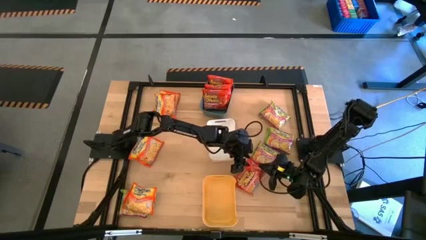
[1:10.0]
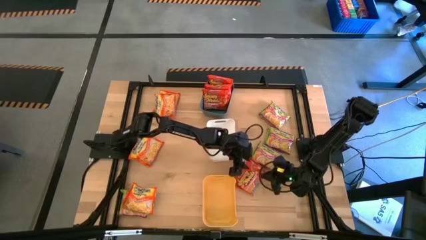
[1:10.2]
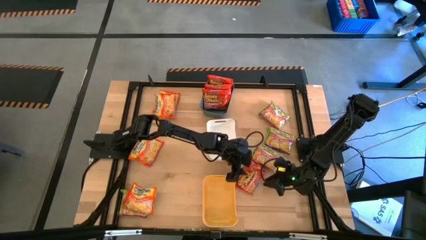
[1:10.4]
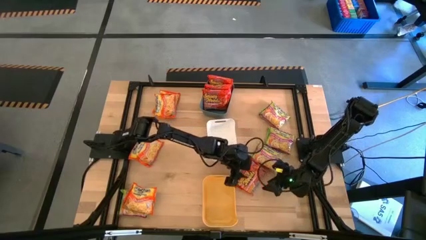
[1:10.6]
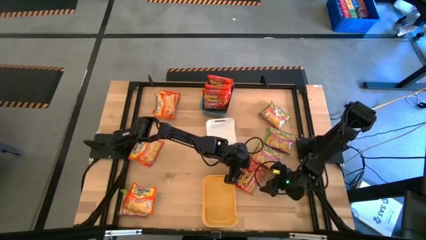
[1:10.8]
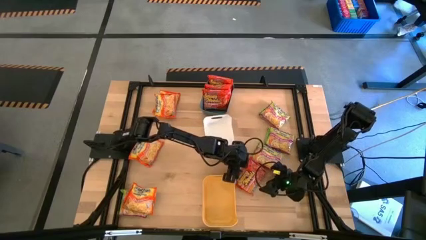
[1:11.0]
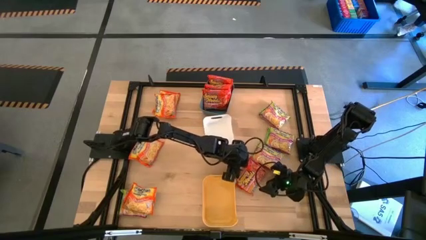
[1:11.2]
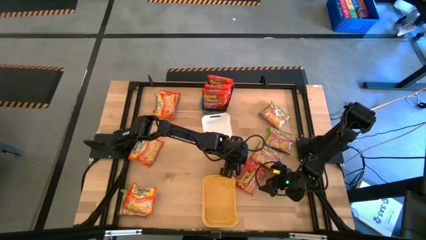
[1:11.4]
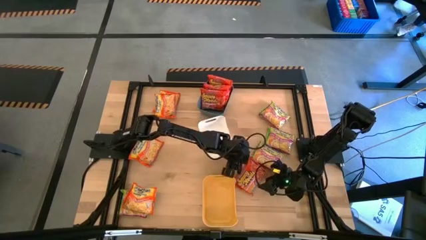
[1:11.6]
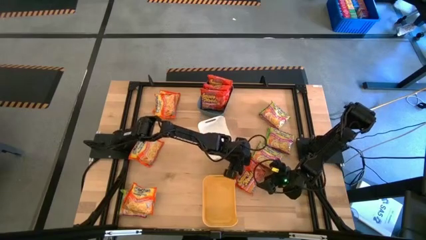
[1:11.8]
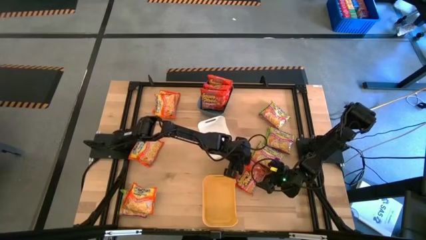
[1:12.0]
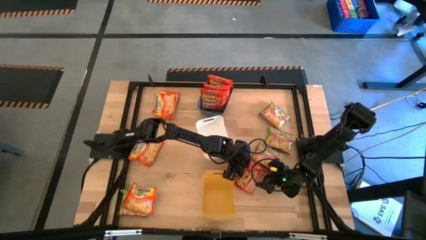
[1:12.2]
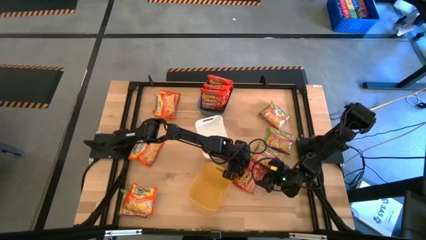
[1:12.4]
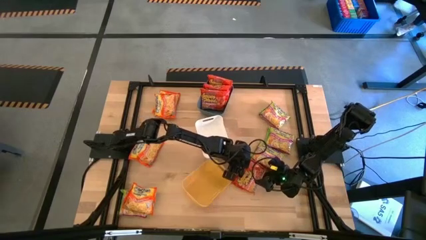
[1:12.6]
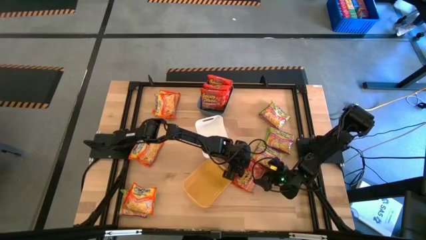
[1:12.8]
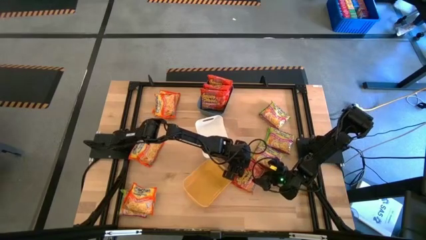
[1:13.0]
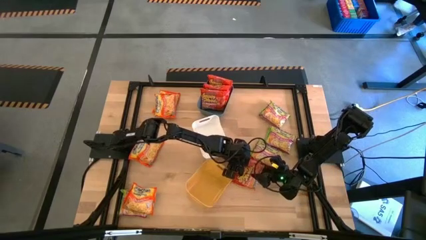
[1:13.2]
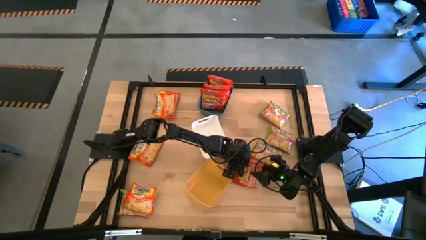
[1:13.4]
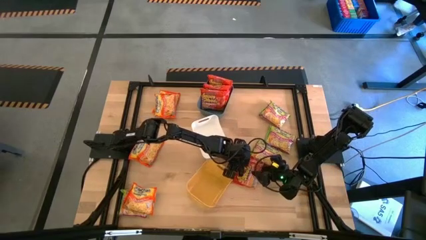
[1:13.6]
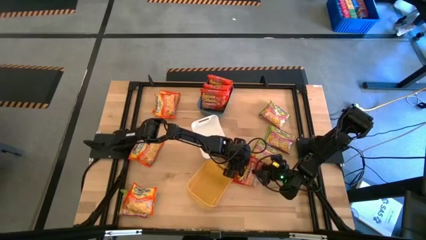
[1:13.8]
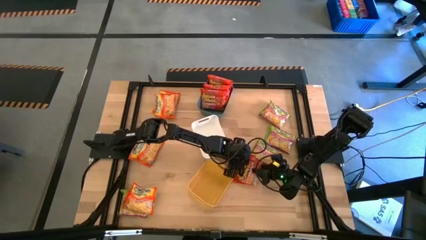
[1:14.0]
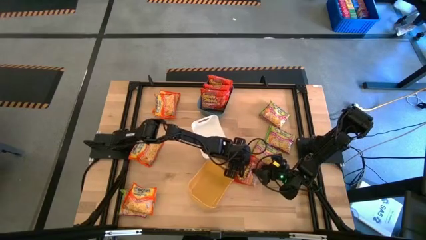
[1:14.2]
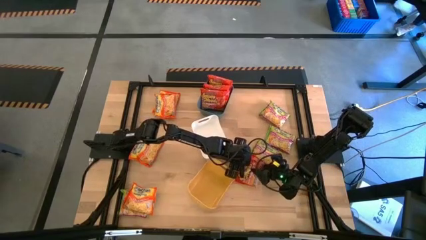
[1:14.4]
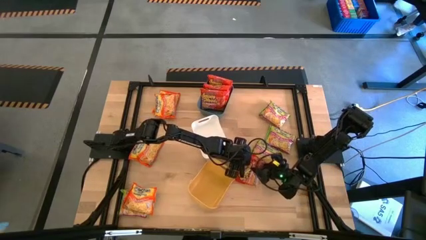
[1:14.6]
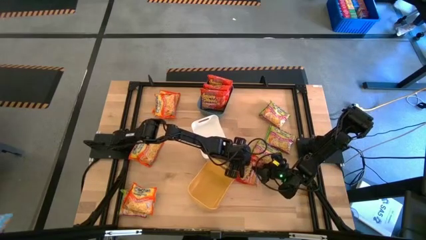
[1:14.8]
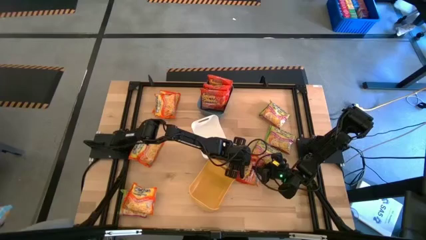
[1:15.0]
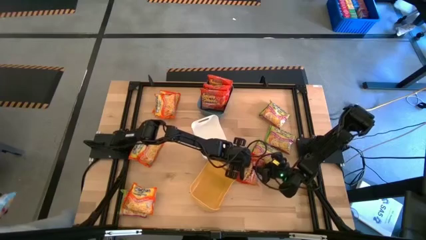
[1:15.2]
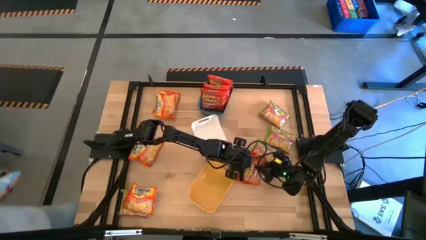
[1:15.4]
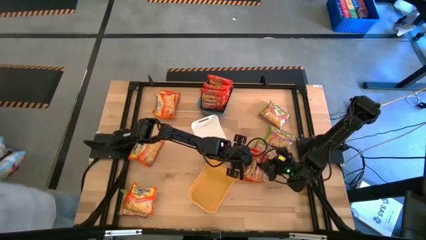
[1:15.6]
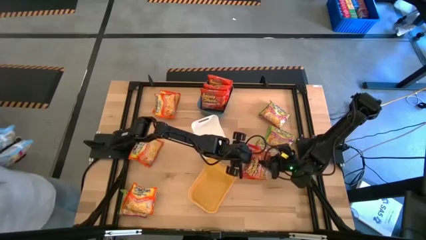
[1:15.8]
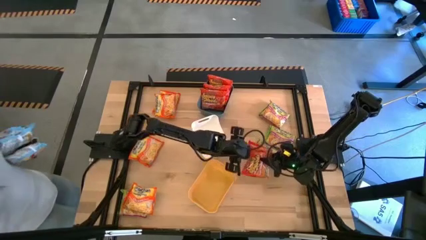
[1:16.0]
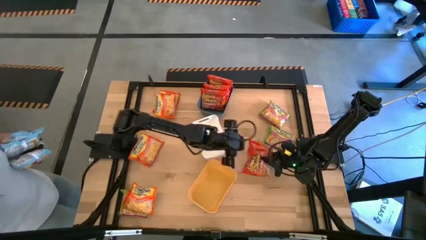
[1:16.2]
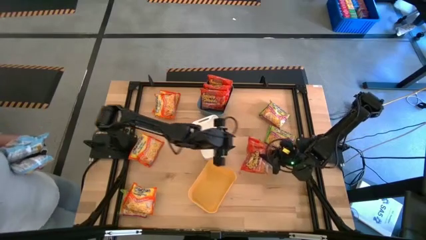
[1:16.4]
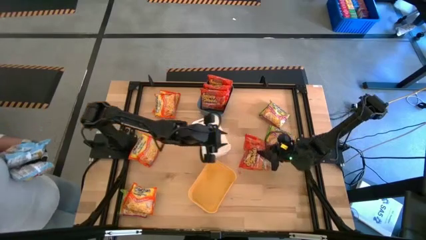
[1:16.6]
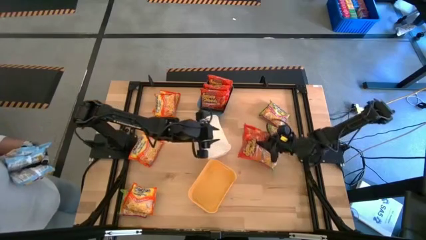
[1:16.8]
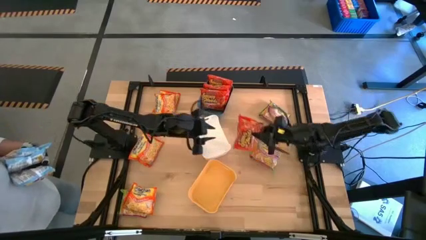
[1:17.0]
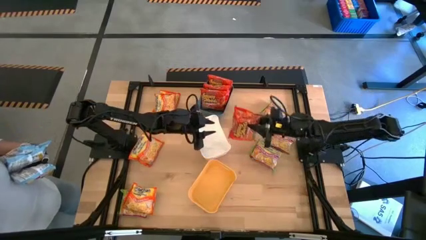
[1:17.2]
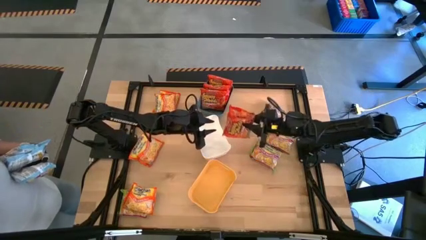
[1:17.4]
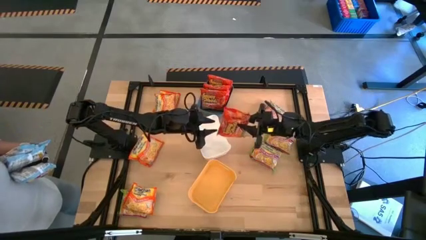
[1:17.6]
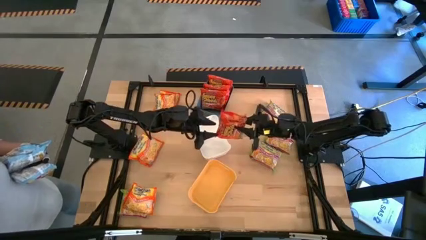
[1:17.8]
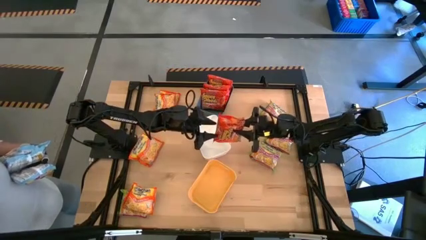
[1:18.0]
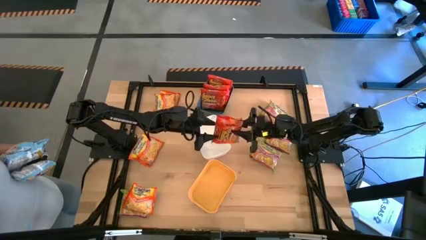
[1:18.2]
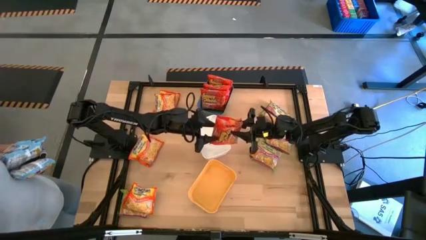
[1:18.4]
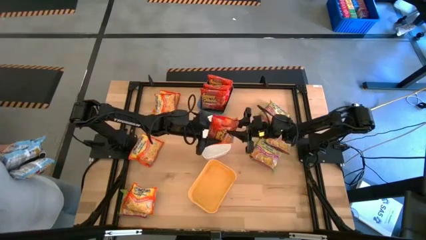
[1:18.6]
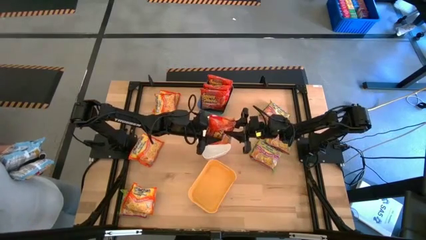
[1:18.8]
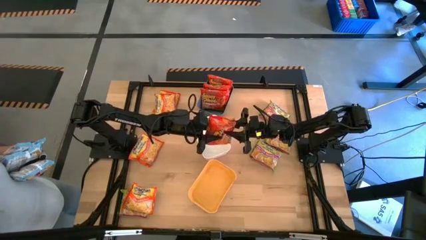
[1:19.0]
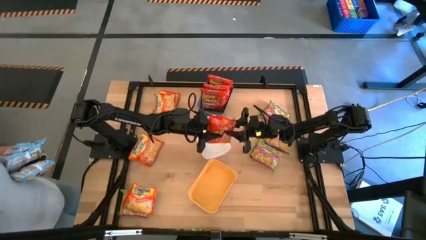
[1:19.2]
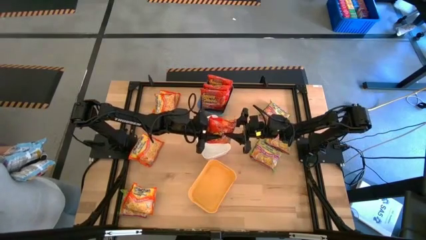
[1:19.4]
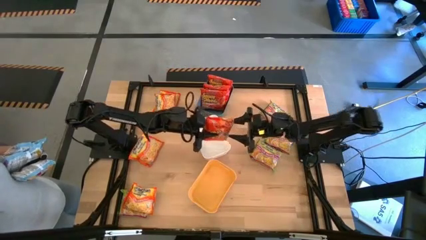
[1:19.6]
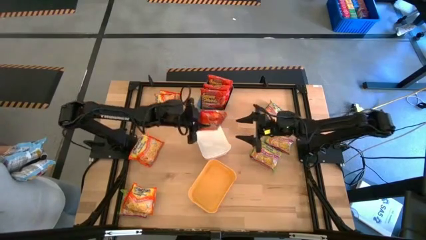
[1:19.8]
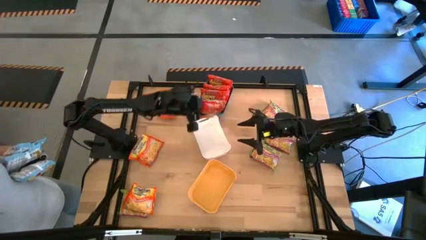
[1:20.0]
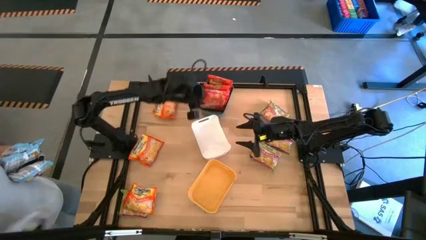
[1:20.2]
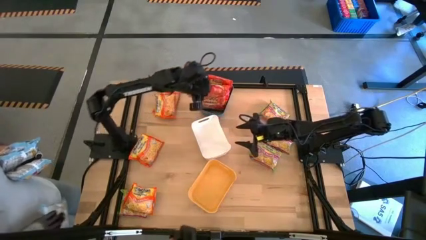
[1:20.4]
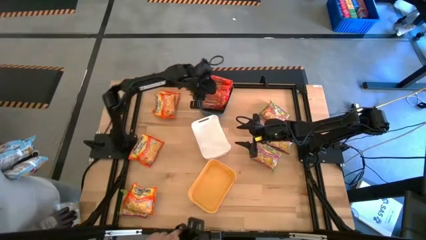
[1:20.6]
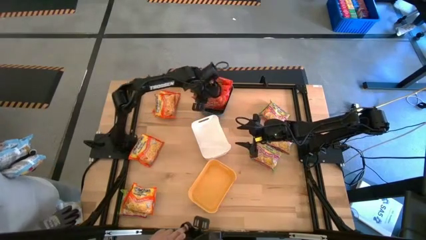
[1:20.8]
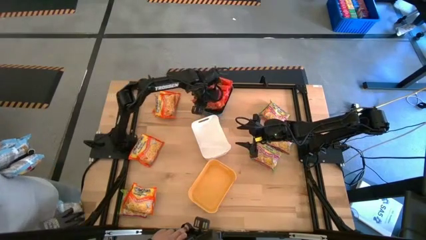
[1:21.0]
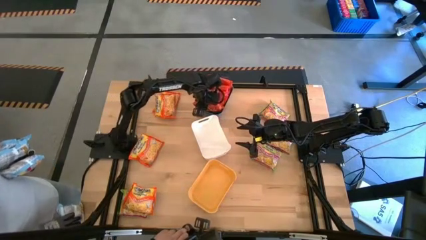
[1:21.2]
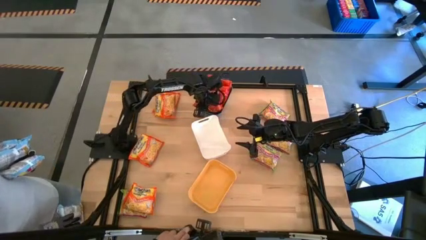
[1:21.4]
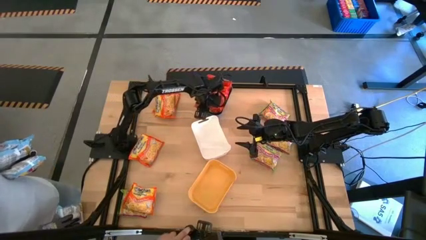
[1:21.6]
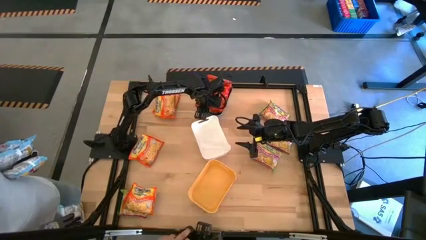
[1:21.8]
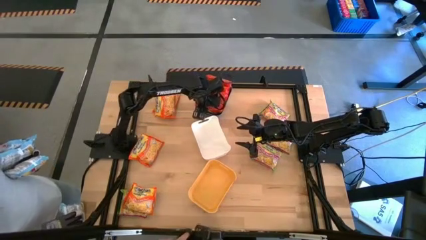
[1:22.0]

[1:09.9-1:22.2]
Task: Sort Maruchan noodles
Put the red noodle pack into the blue bin

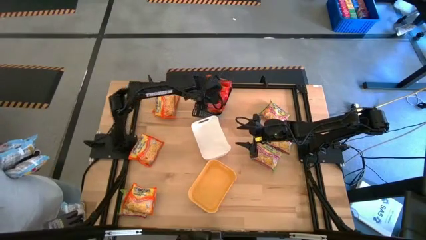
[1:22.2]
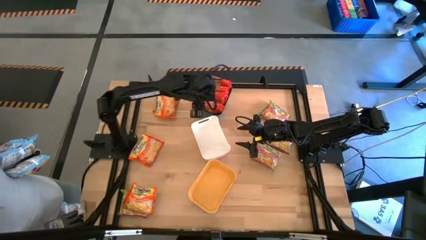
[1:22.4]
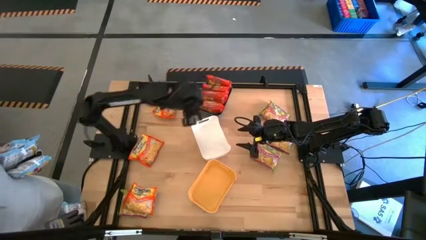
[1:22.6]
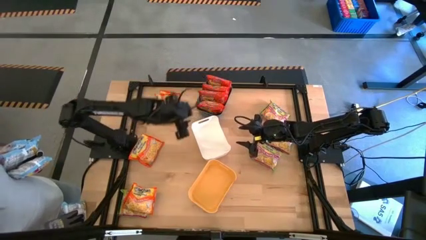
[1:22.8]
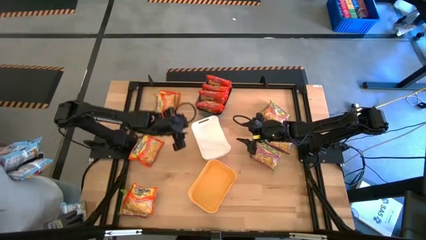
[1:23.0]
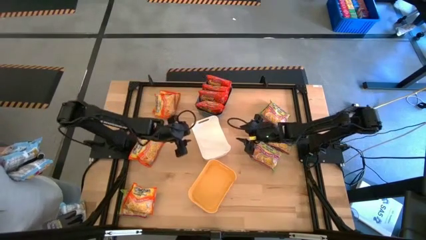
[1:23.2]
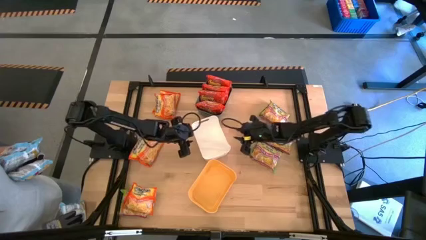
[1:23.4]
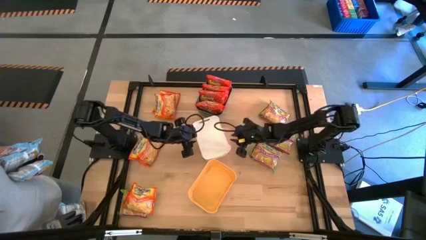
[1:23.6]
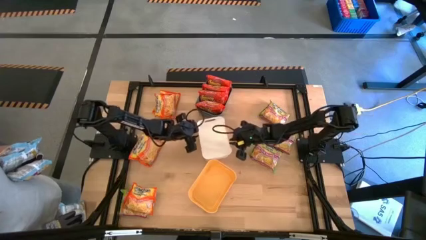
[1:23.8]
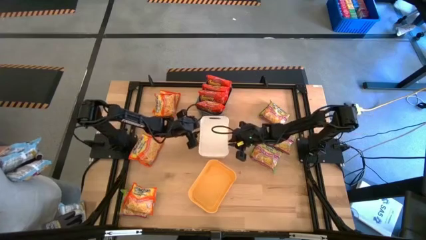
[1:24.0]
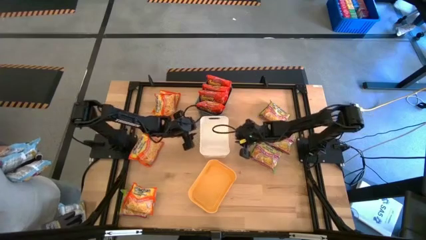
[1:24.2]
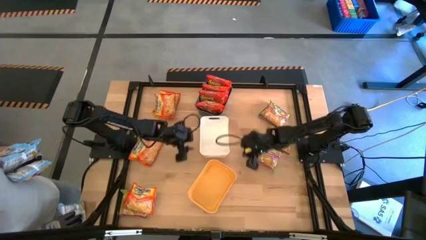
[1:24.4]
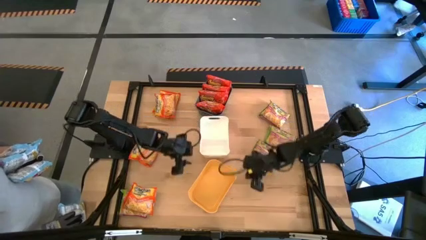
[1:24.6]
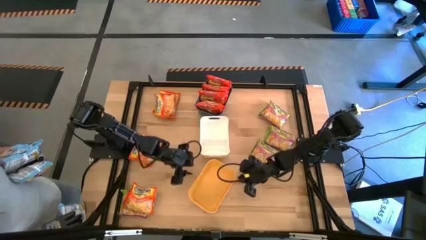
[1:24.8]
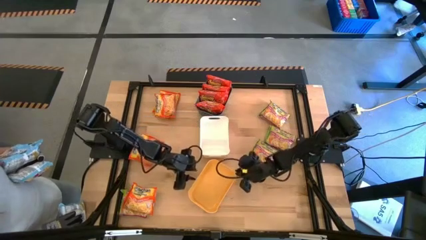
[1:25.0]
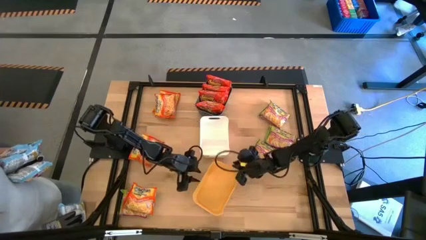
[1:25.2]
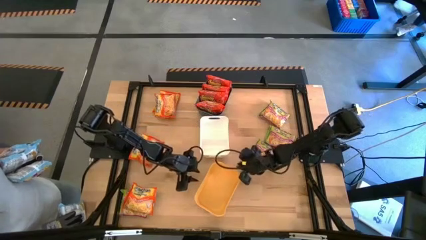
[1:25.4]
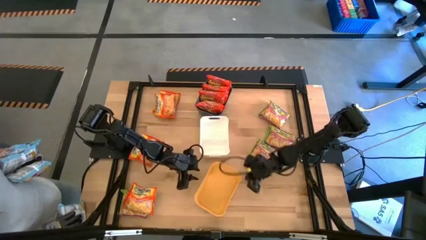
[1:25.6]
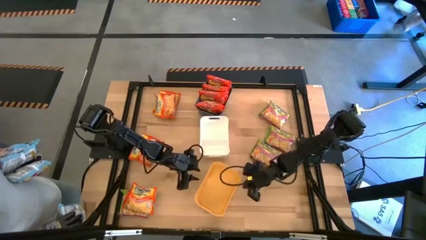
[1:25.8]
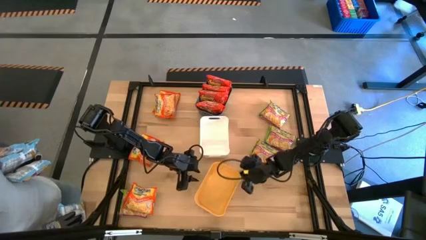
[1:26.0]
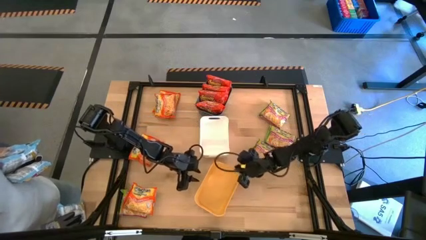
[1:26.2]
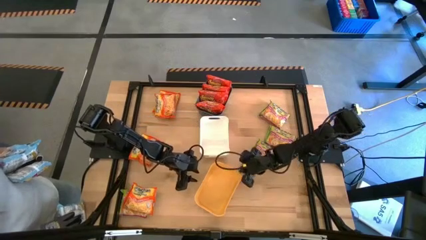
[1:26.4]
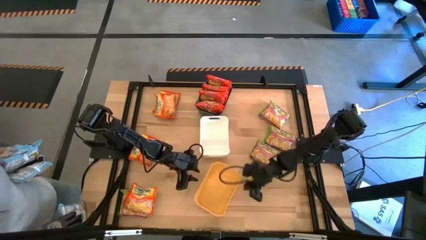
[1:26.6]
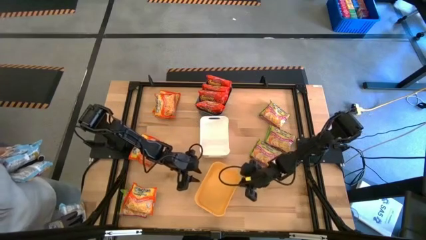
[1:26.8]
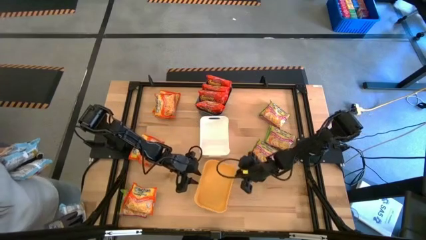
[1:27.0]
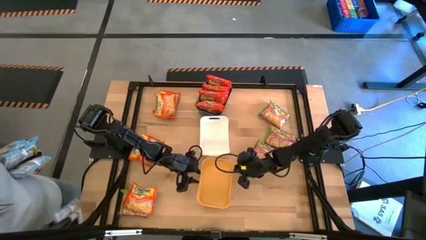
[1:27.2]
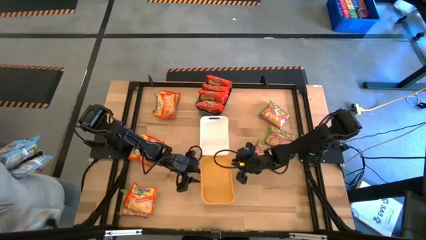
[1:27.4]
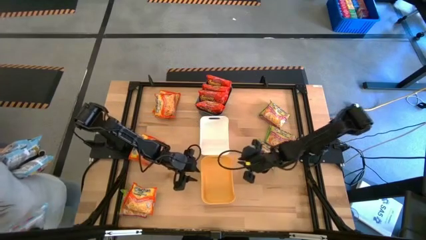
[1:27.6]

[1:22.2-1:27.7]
Adjust the bins on the table
